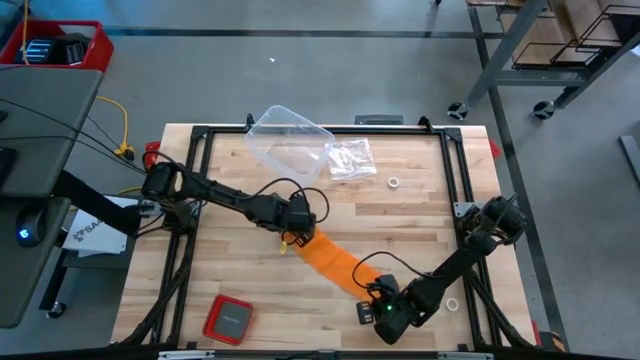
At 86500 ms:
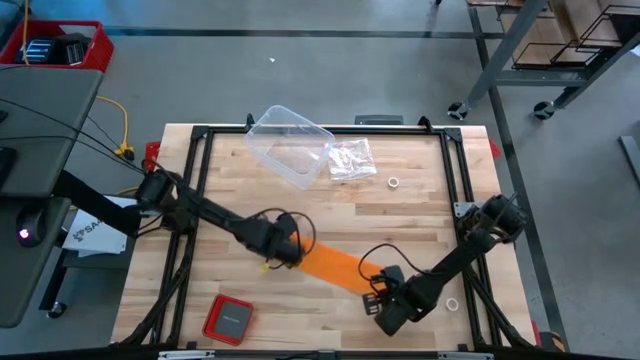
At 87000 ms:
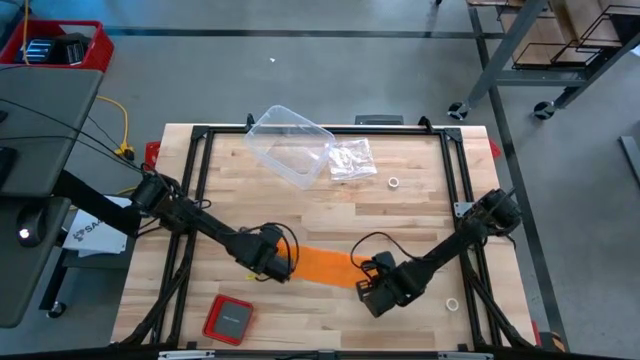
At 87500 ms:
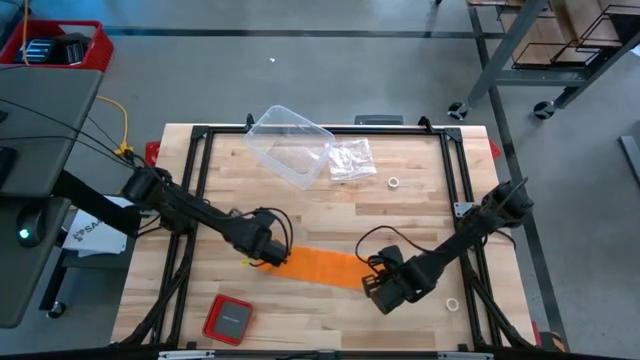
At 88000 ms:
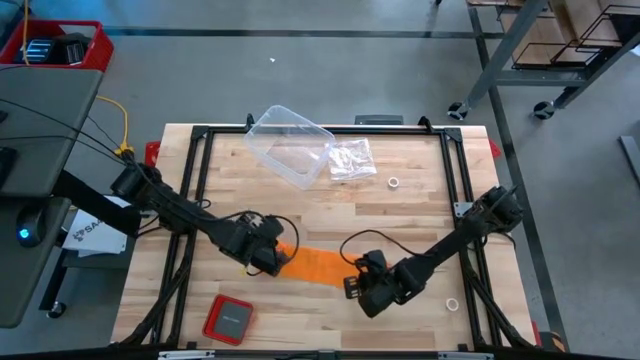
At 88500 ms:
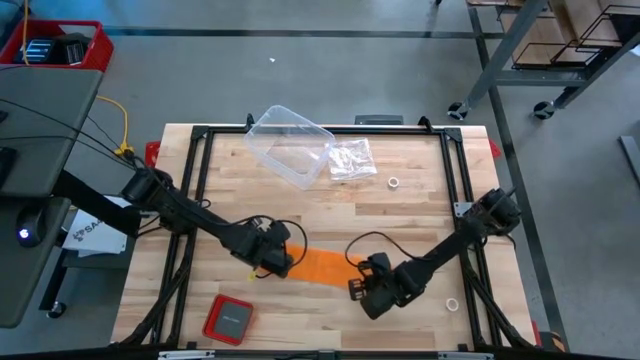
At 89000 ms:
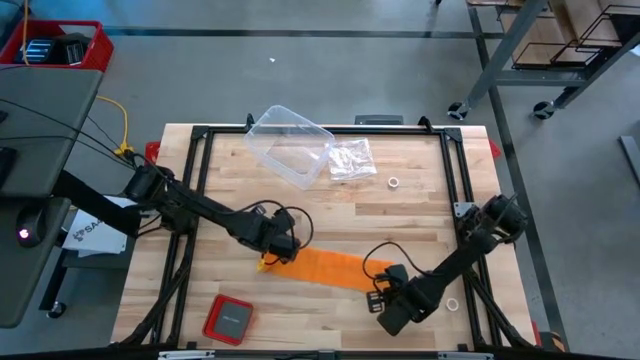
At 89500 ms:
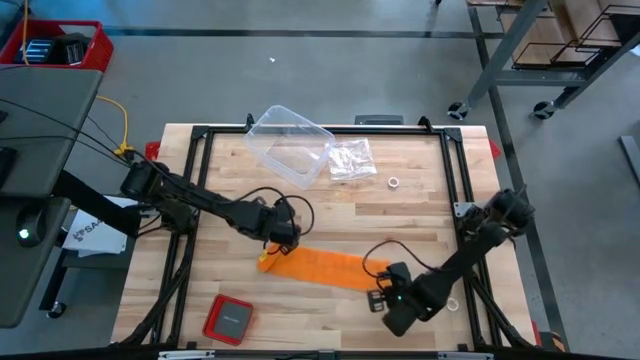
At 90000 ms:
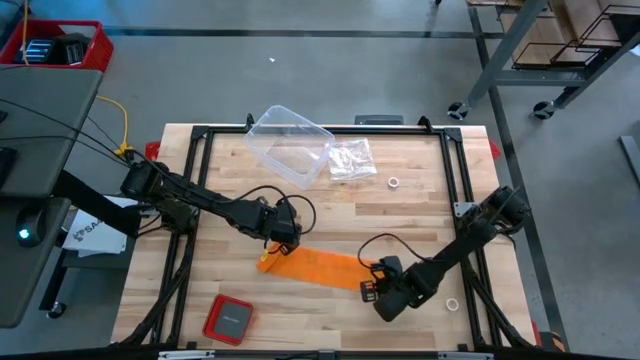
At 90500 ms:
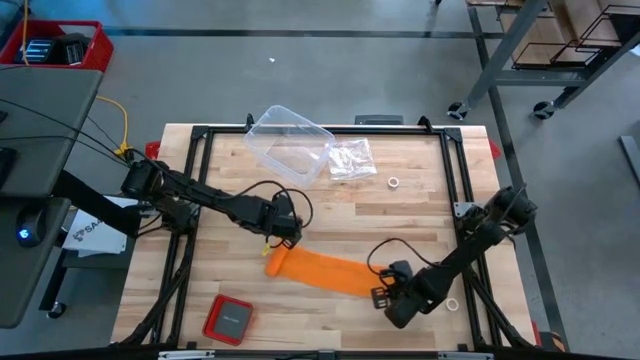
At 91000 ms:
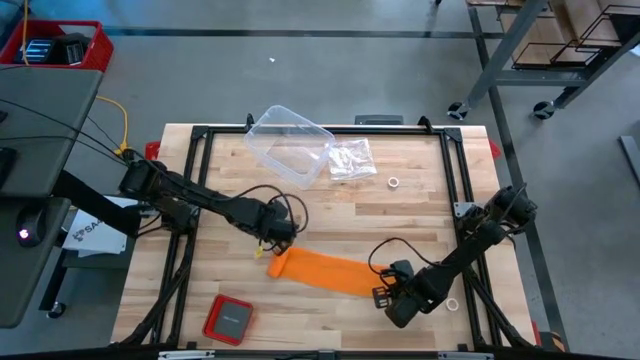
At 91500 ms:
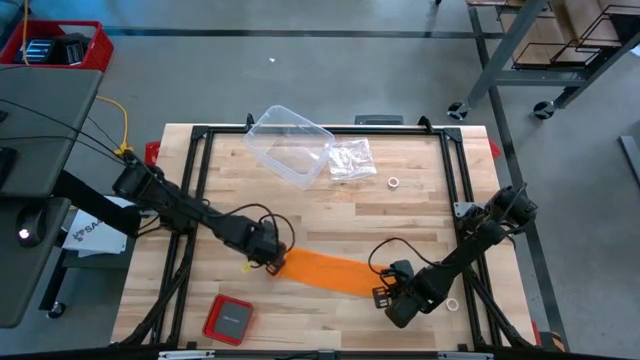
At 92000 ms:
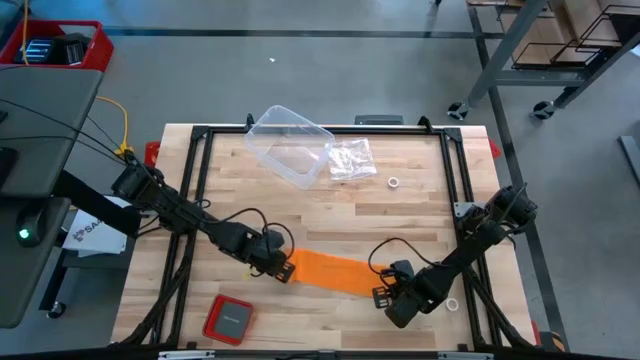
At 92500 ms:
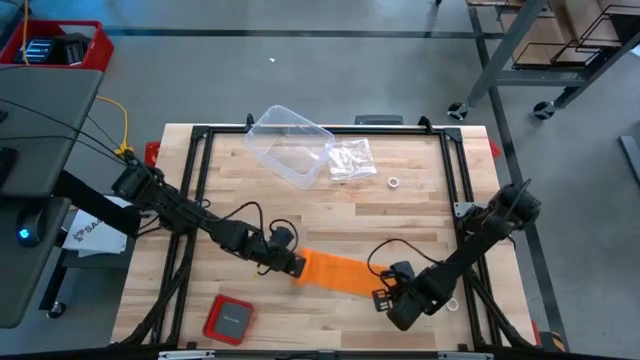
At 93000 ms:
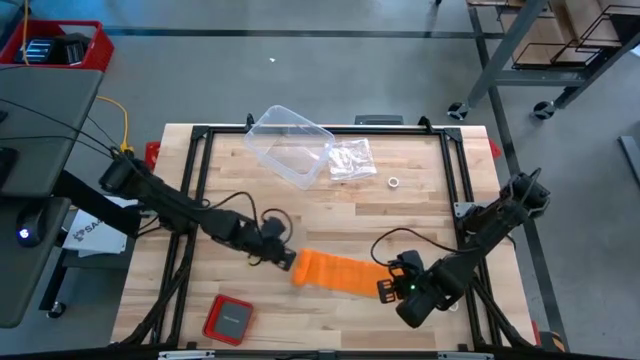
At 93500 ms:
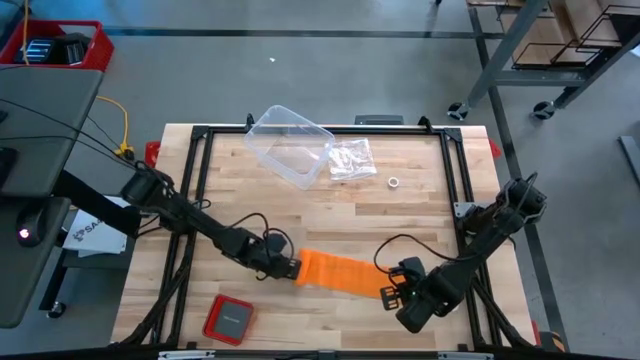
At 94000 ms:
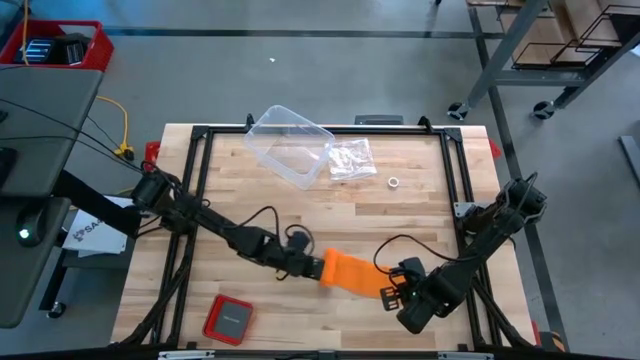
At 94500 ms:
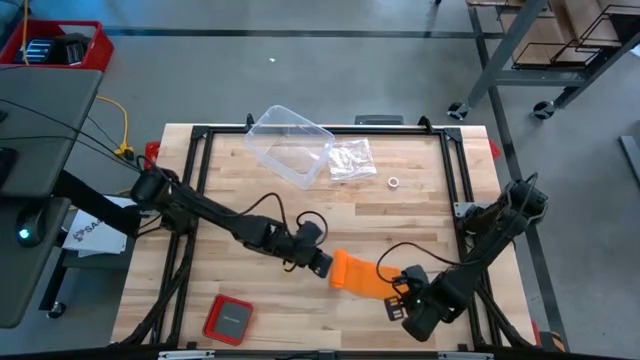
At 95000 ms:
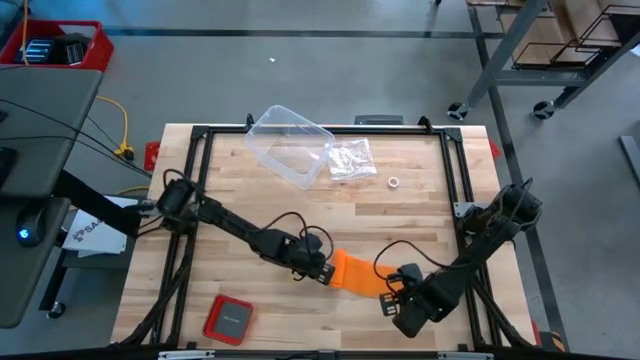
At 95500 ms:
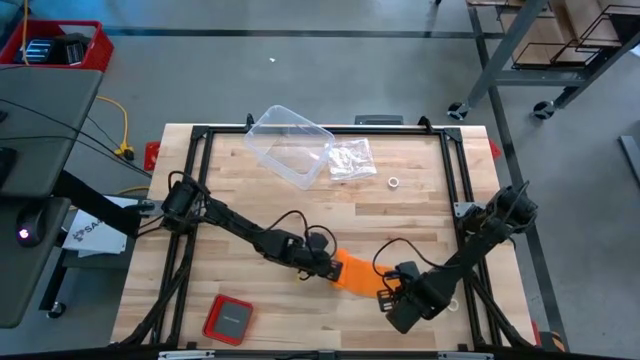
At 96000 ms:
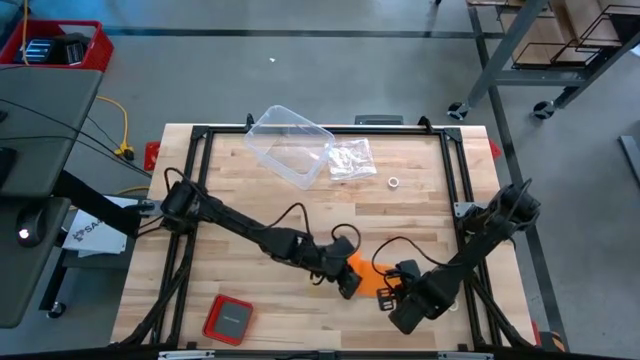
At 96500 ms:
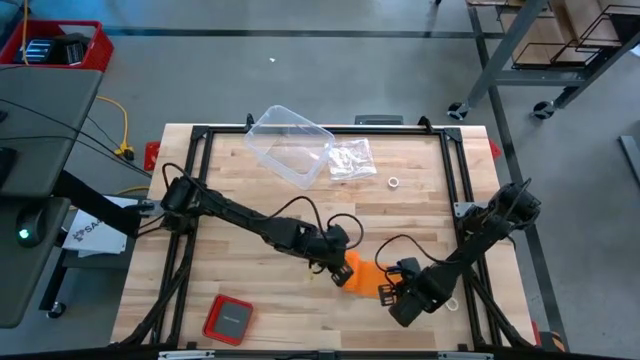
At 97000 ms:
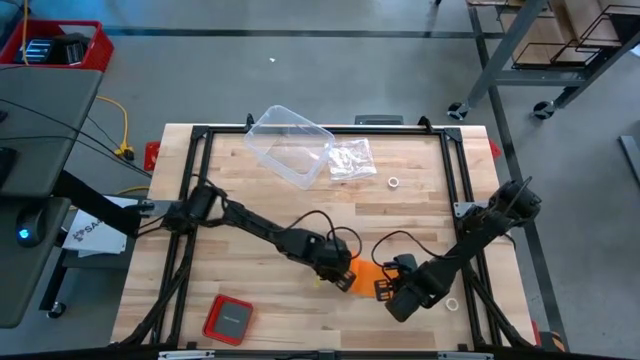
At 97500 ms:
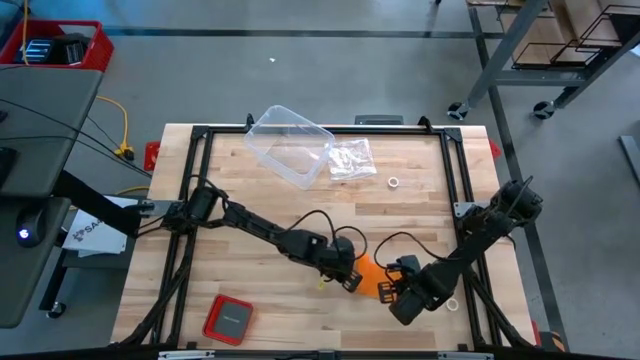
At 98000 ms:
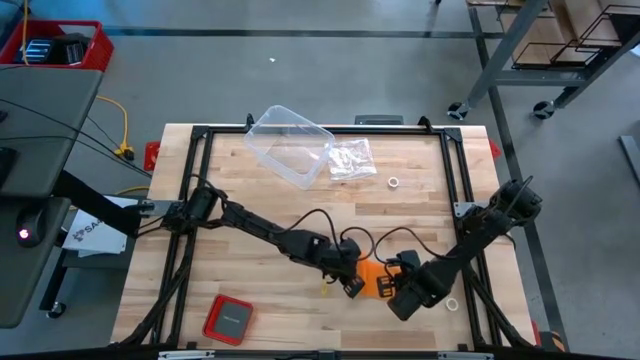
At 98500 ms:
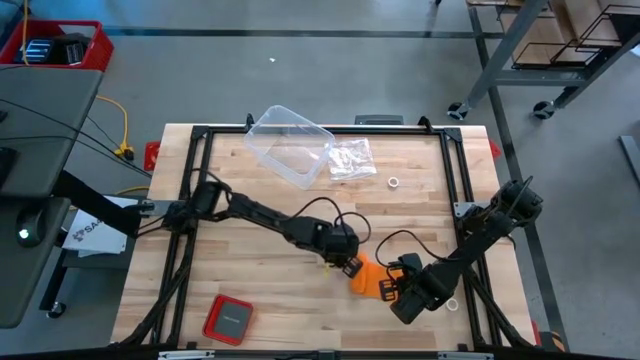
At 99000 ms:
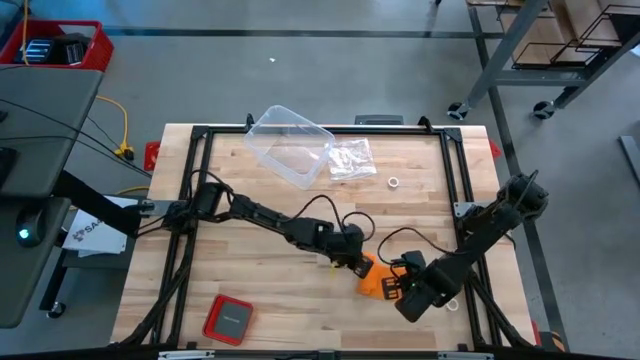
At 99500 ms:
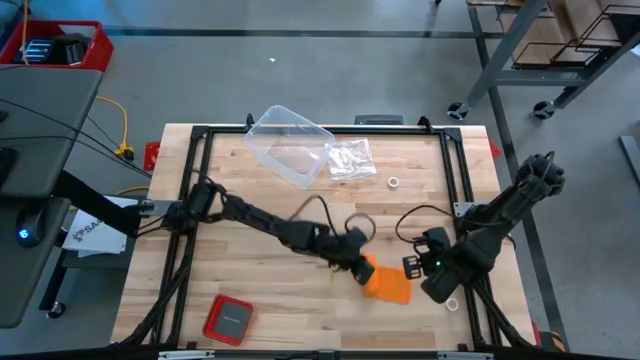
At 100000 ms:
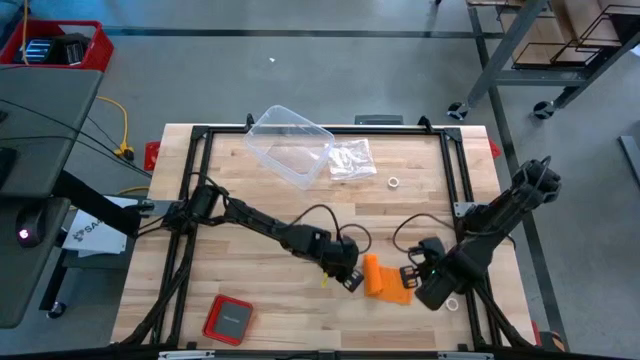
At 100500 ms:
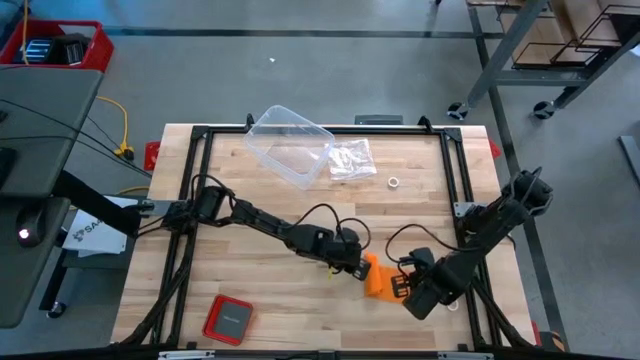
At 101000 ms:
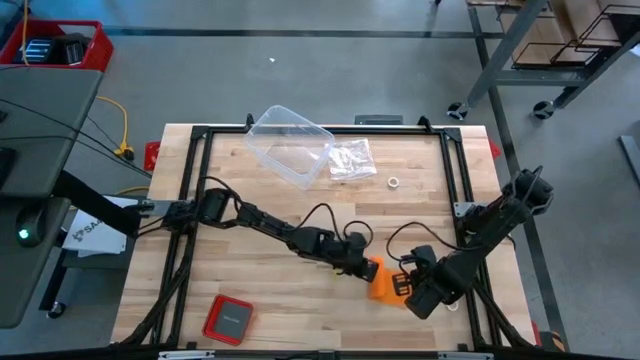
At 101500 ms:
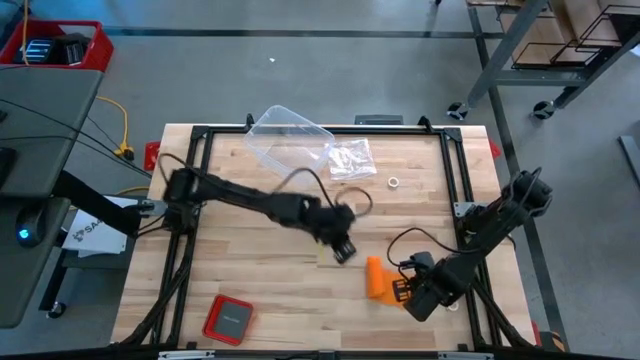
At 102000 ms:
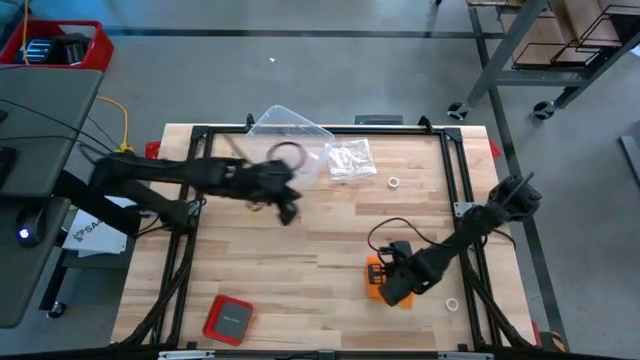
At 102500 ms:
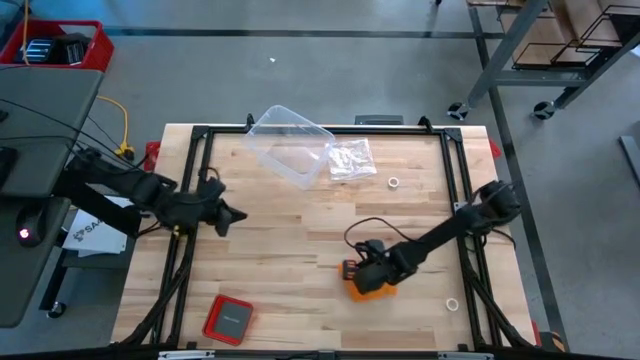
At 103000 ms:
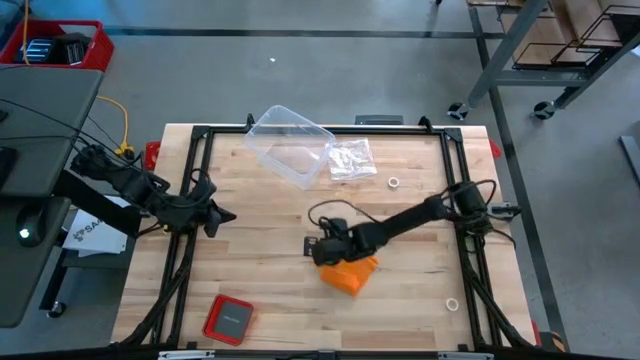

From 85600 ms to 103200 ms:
Task: Roll bandage
Roll the orange bandage

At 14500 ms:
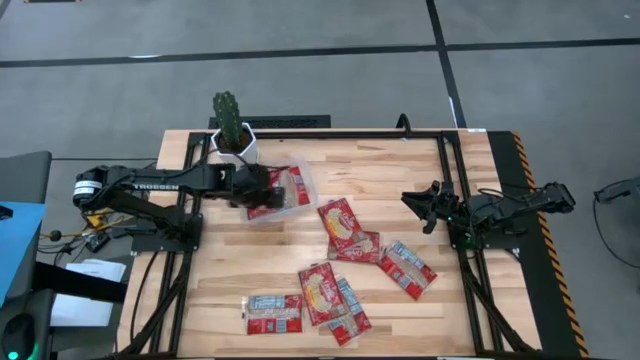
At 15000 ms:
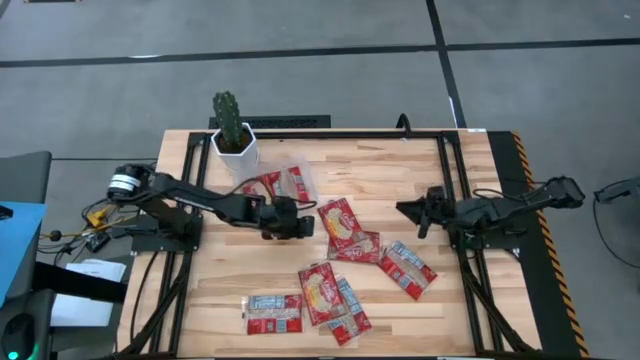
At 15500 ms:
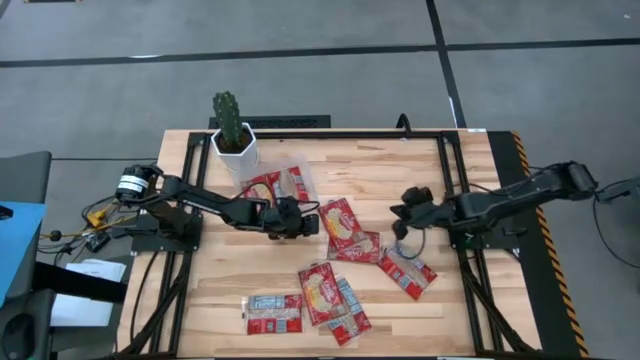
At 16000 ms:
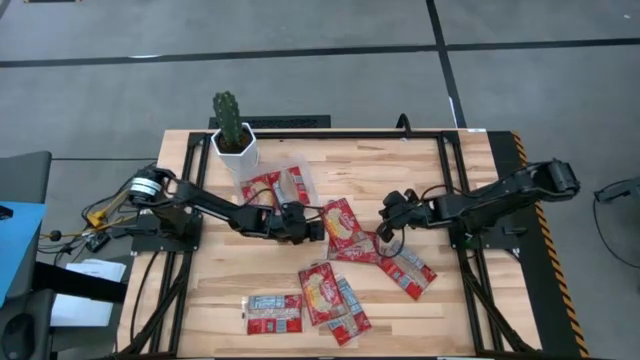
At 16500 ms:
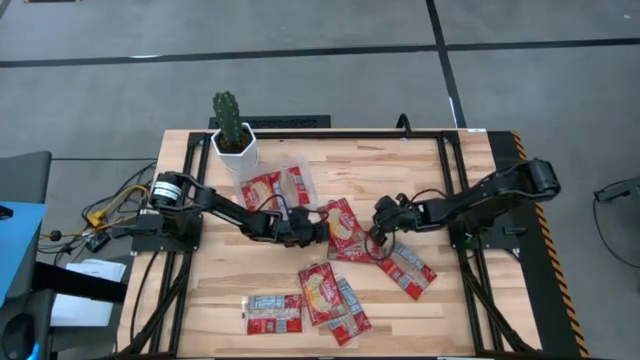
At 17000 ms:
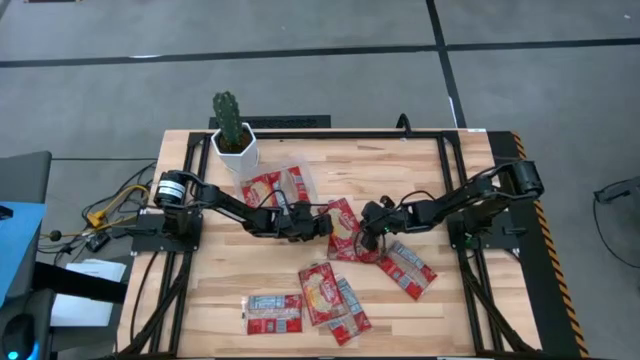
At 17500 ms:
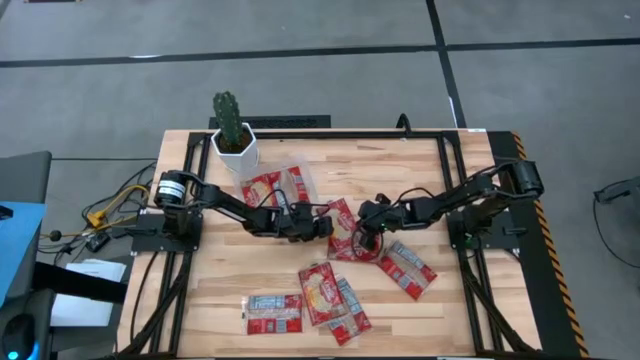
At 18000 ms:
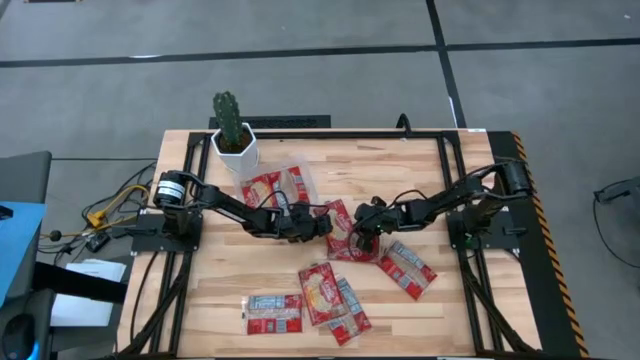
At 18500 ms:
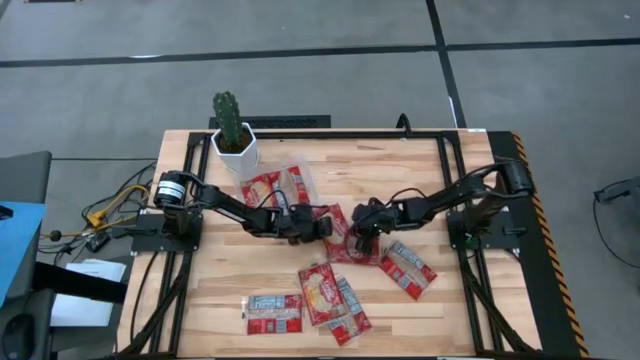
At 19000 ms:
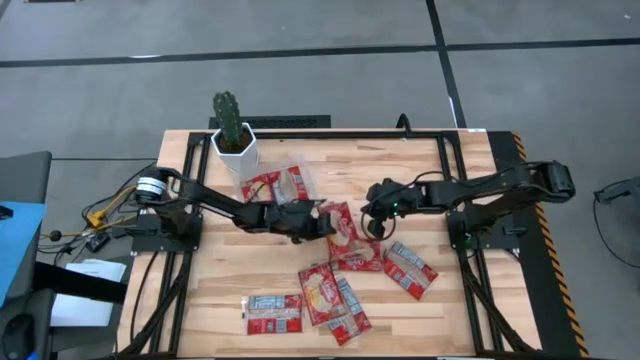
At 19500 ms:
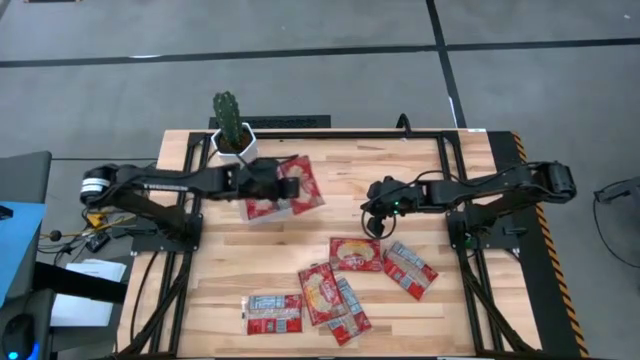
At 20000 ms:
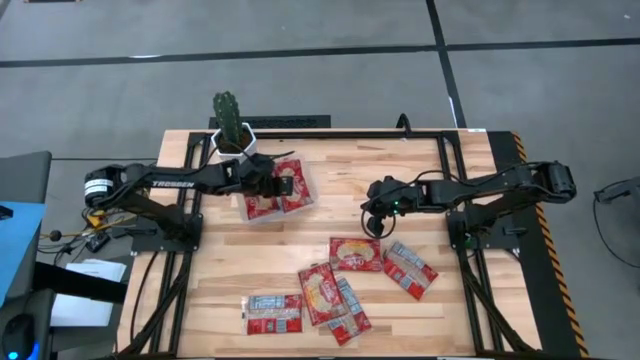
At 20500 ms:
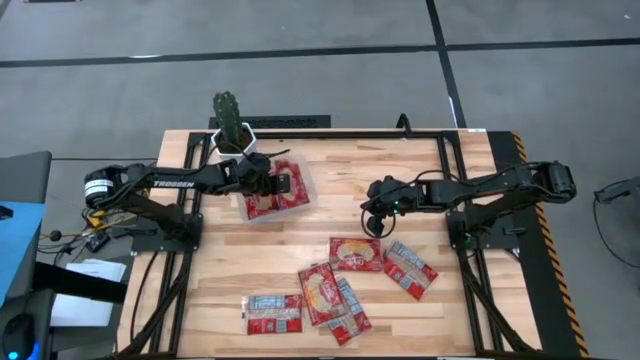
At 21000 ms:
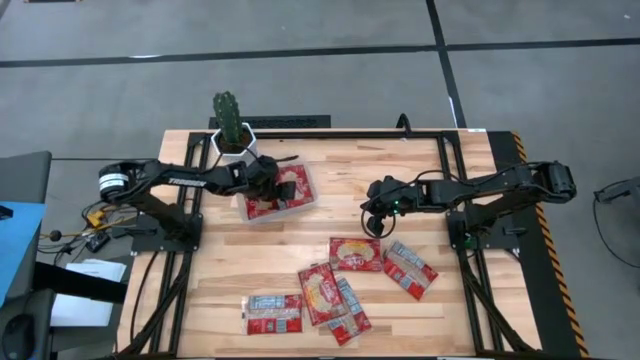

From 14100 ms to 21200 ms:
Task: Sort popcorn bags into baskets
Put the red popcorn bag into the transparent bin
